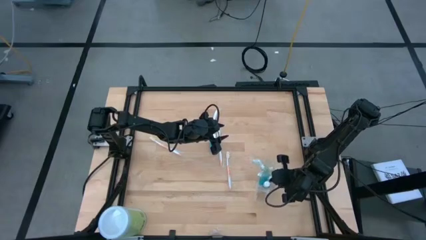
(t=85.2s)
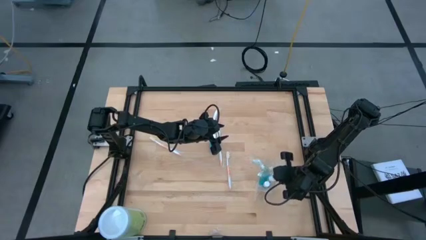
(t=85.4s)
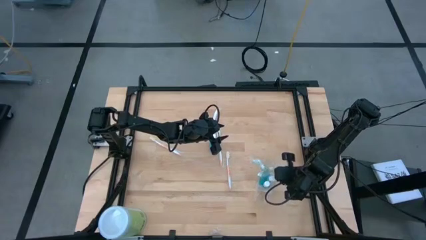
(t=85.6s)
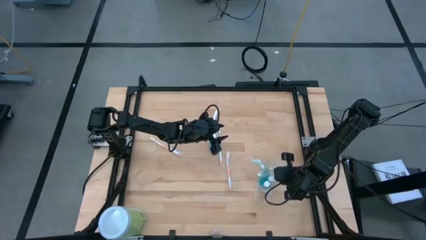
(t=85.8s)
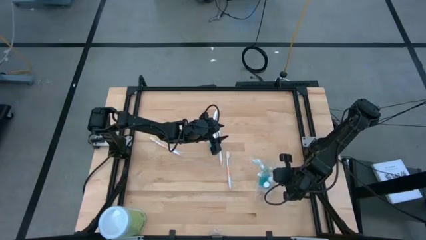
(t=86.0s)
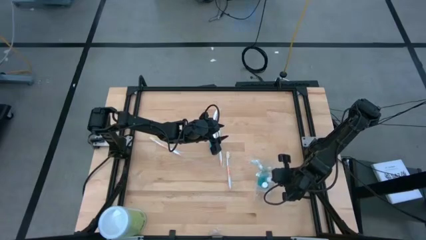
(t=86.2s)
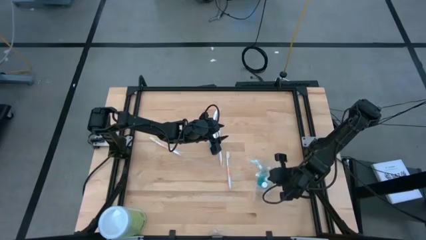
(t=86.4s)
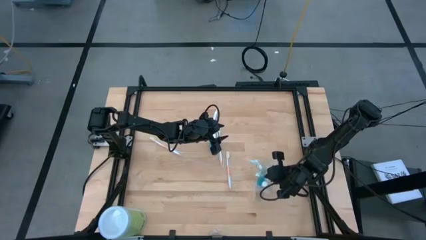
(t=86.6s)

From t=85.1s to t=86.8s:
Task: Pick & Place toothbrushing station
Adjust the blue mouthwash in the middle section of the transparent organizer

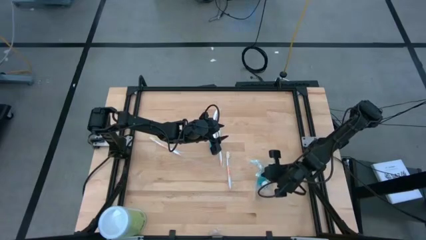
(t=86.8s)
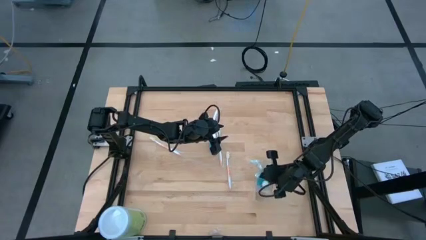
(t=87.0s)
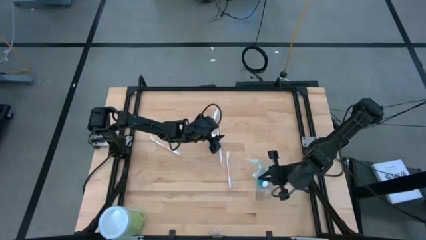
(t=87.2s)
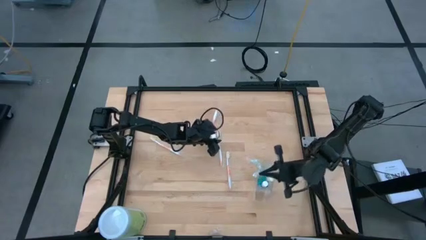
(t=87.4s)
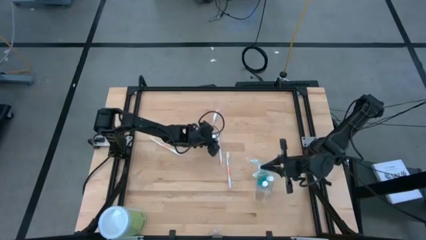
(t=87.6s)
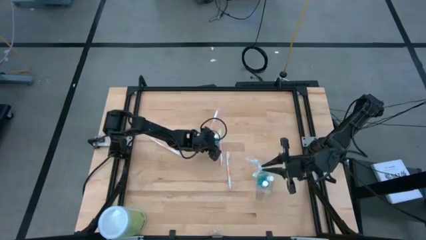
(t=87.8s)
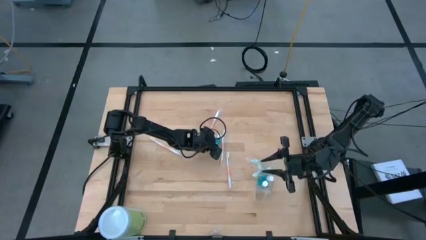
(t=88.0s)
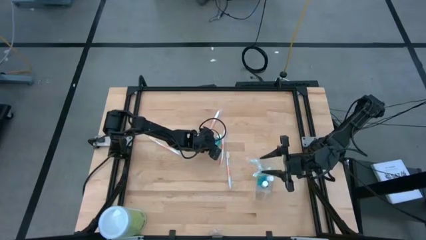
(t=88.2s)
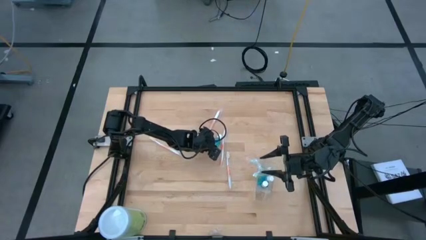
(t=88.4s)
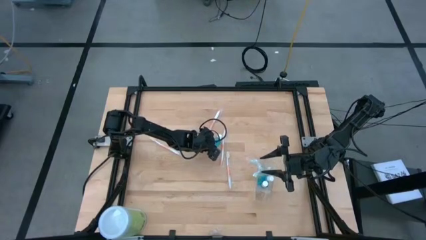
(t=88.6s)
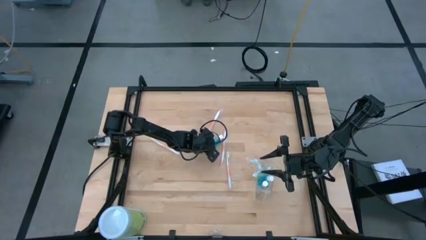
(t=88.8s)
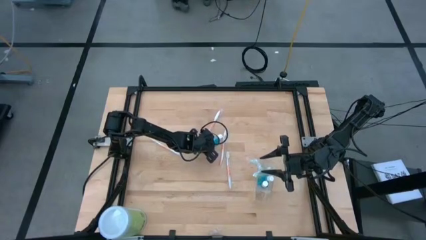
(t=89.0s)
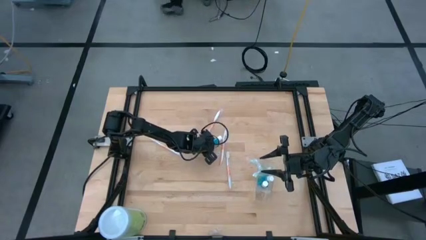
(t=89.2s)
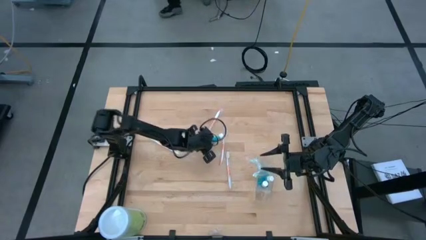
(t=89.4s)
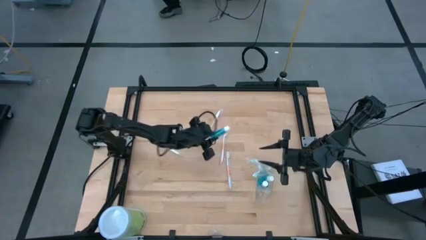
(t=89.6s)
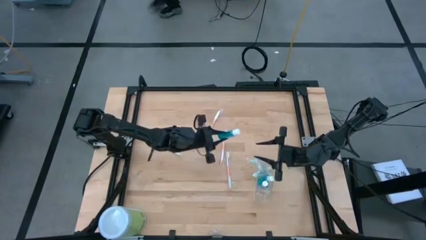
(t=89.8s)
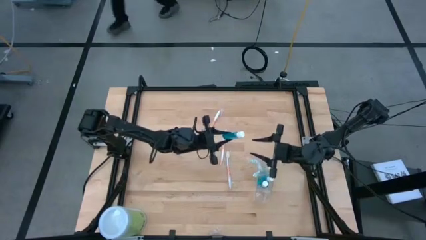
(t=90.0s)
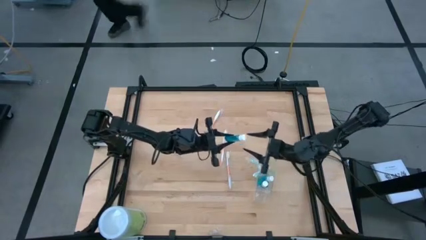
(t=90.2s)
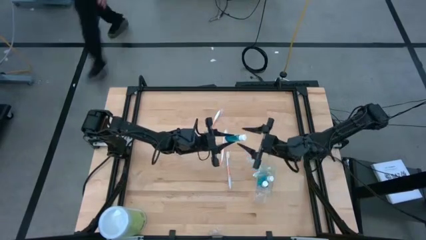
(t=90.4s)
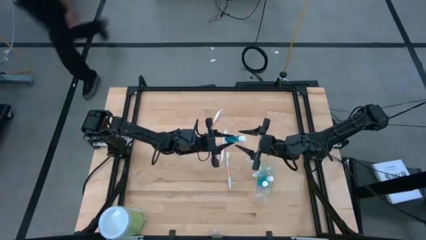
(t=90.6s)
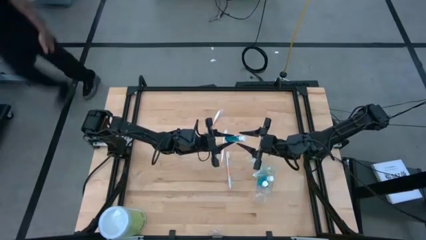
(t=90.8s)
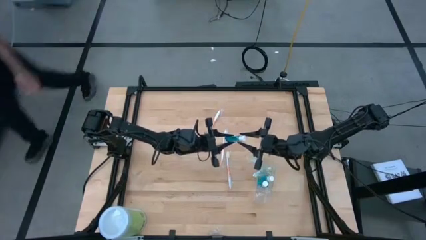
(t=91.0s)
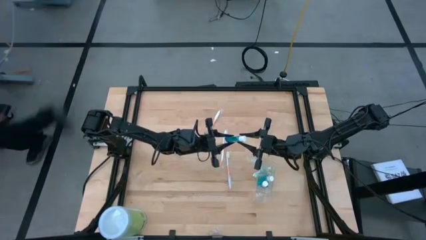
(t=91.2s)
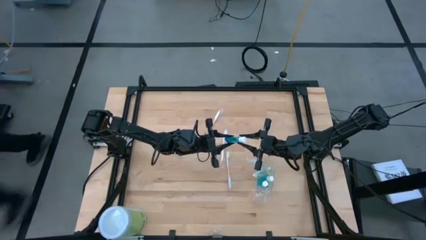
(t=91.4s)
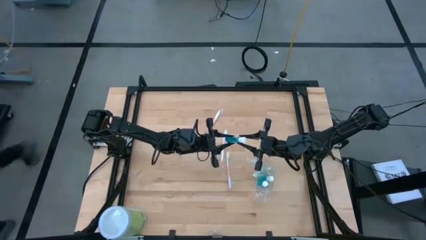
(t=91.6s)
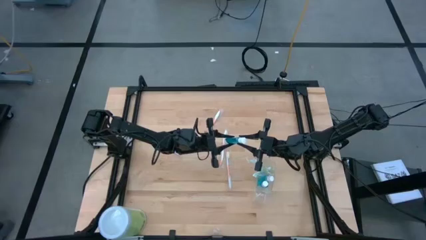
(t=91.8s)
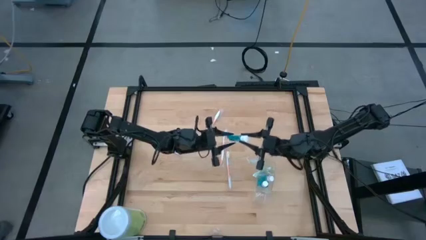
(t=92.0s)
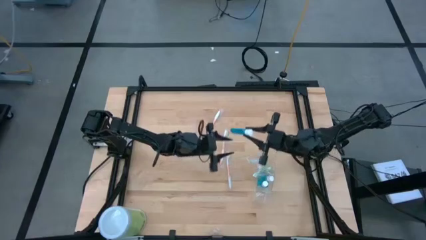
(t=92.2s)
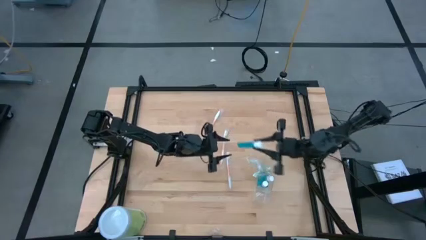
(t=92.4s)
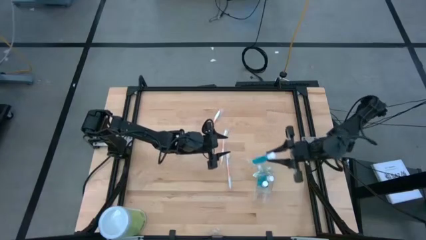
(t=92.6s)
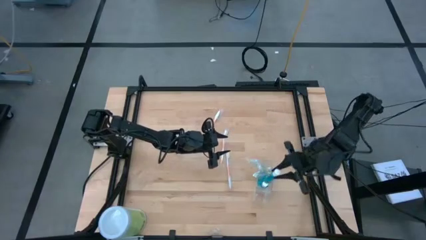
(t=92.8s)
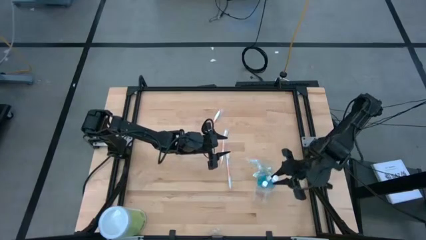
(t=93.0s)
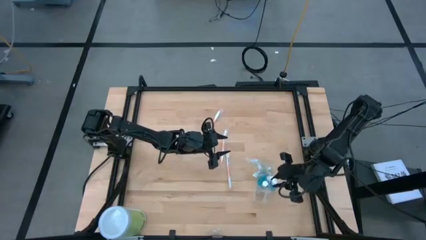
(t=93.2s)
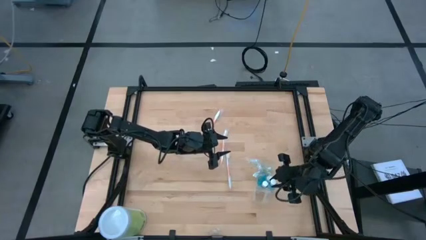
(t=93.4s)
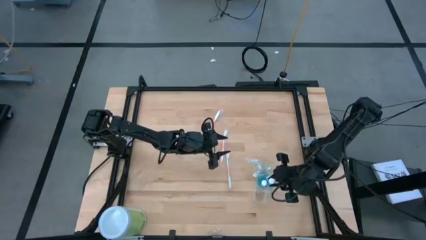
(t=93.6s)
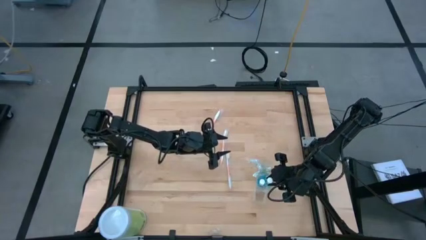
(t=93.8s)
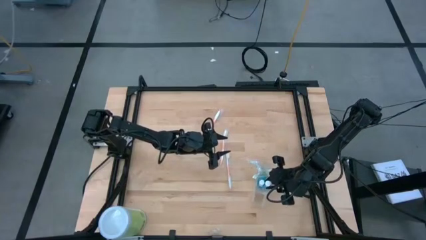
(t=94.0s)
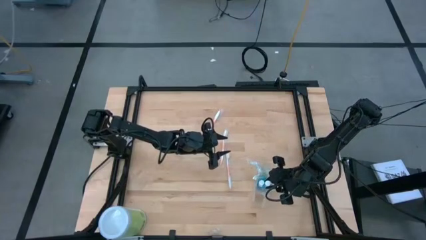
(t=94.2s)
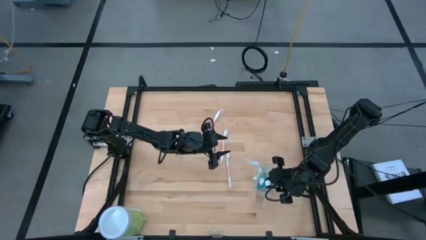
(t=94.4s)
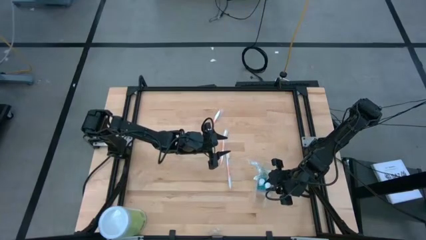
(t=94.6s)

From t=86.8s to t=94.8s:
Put the blue mouthwash into the middle section of the transparent organizer

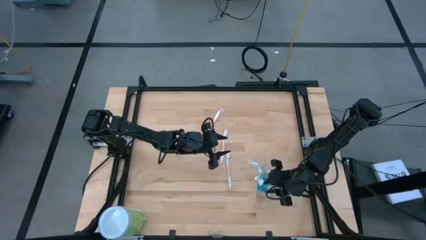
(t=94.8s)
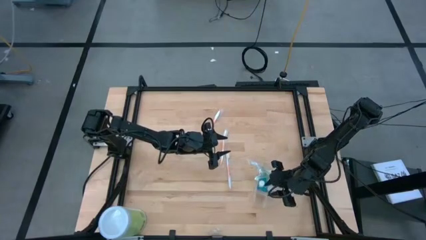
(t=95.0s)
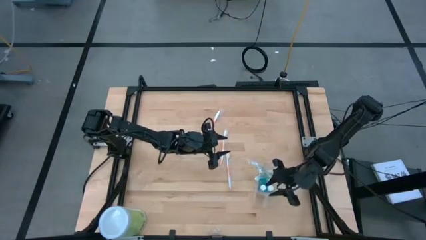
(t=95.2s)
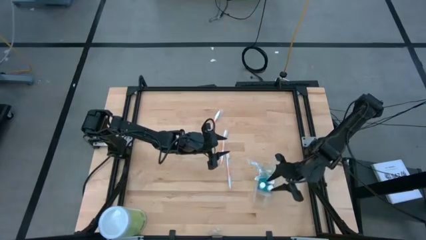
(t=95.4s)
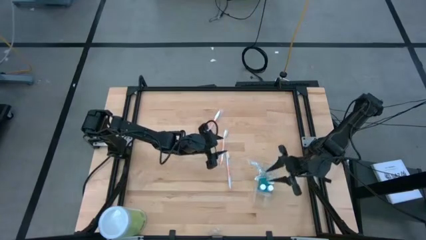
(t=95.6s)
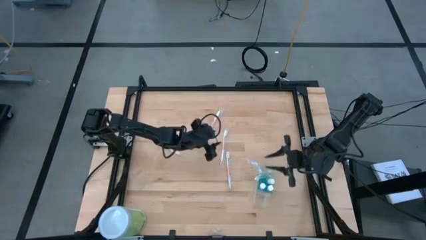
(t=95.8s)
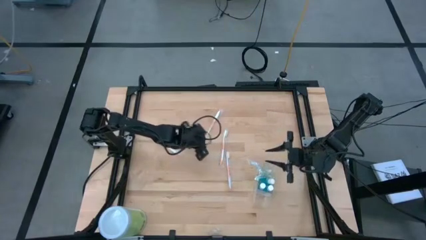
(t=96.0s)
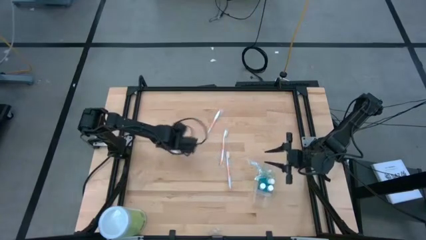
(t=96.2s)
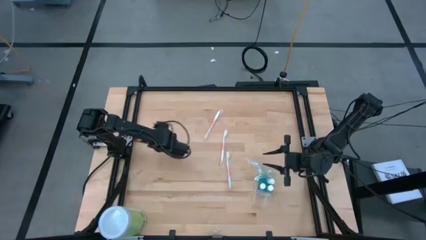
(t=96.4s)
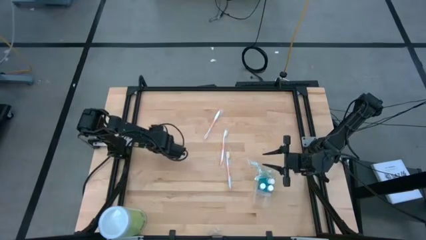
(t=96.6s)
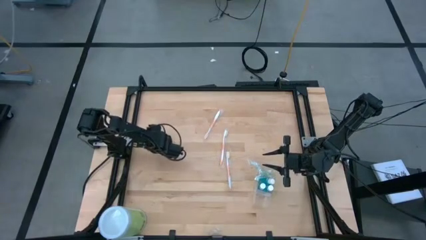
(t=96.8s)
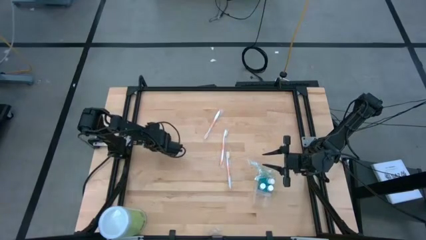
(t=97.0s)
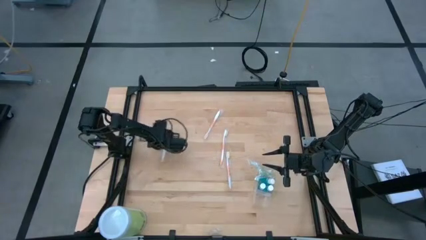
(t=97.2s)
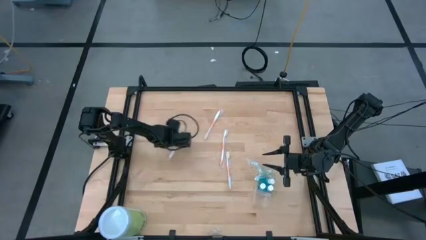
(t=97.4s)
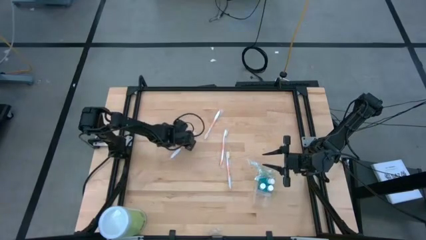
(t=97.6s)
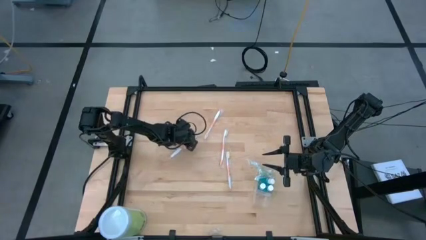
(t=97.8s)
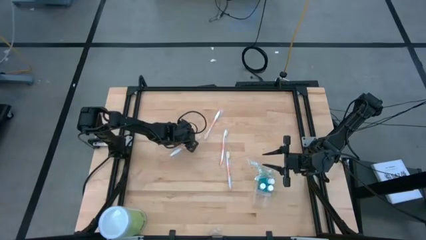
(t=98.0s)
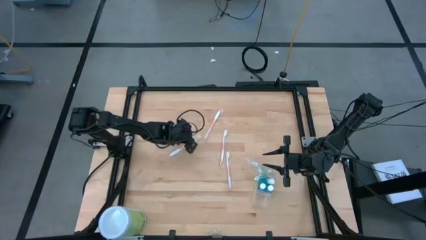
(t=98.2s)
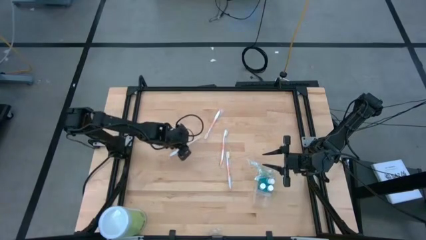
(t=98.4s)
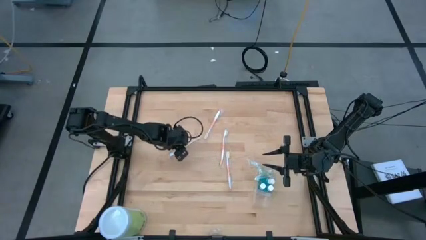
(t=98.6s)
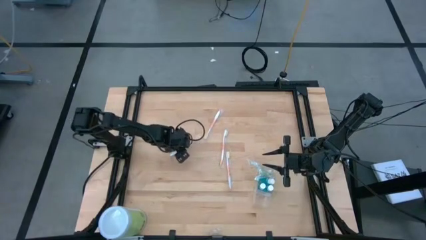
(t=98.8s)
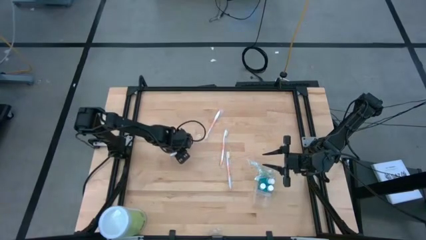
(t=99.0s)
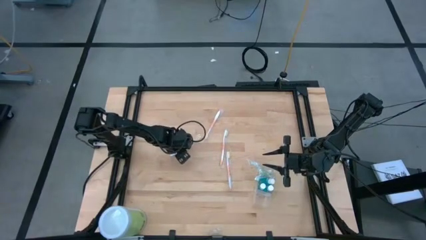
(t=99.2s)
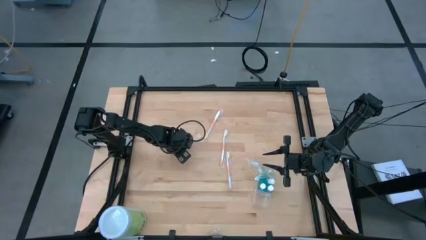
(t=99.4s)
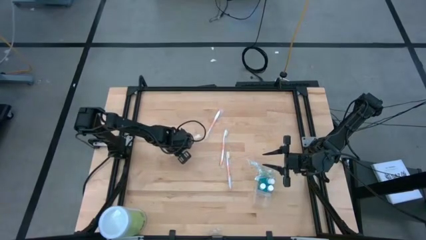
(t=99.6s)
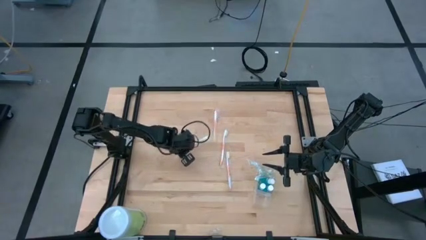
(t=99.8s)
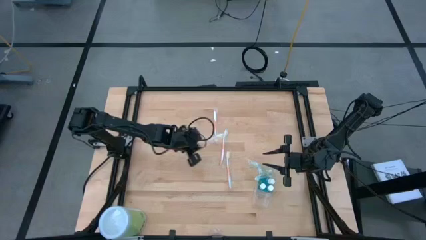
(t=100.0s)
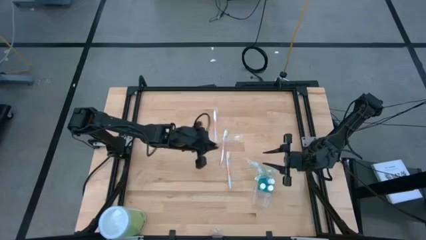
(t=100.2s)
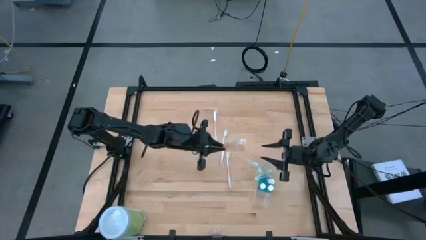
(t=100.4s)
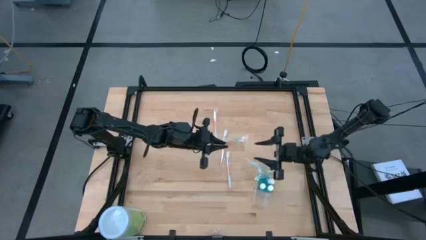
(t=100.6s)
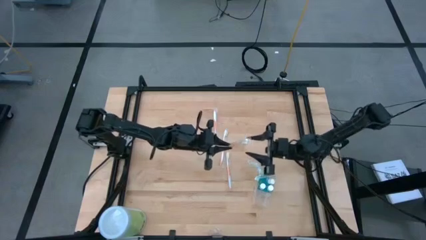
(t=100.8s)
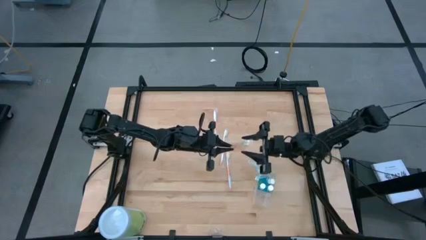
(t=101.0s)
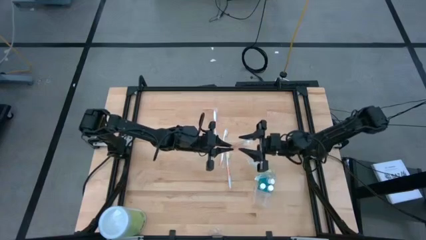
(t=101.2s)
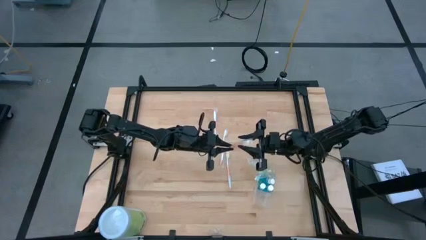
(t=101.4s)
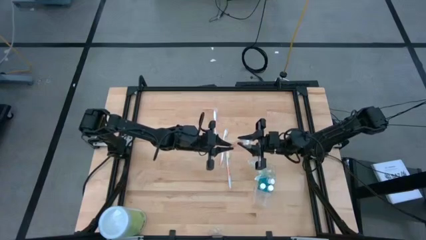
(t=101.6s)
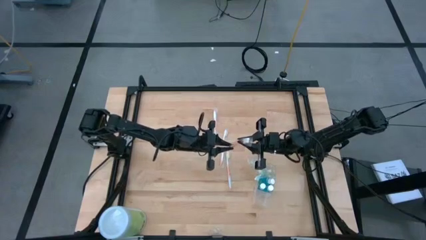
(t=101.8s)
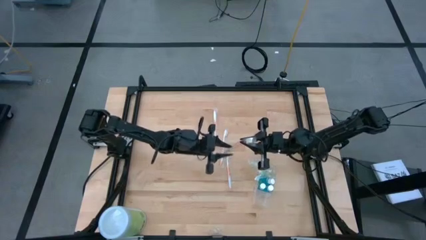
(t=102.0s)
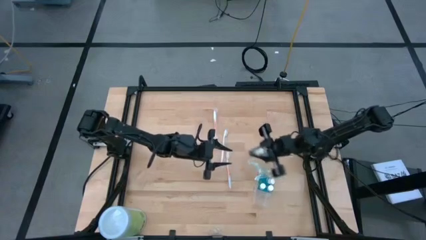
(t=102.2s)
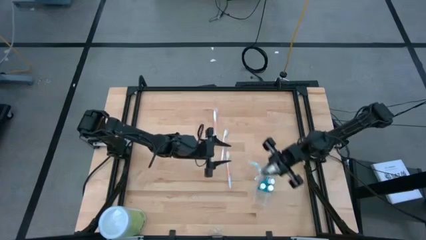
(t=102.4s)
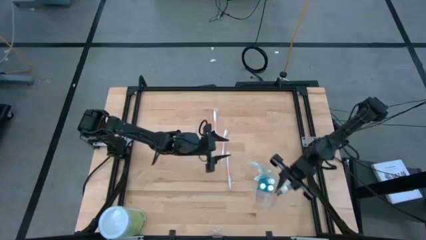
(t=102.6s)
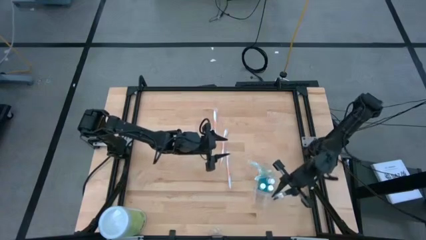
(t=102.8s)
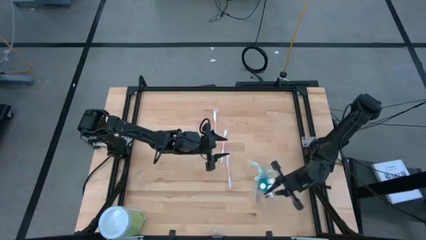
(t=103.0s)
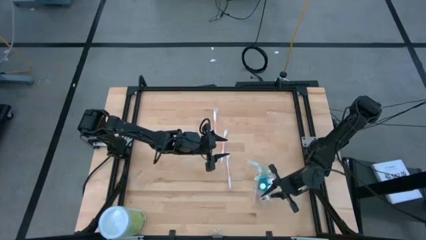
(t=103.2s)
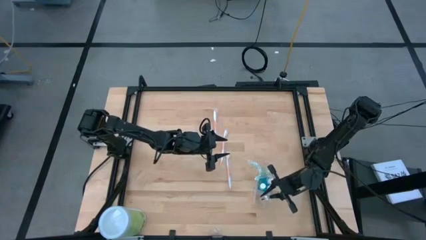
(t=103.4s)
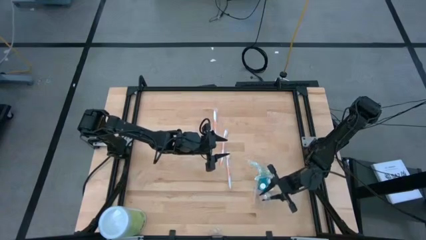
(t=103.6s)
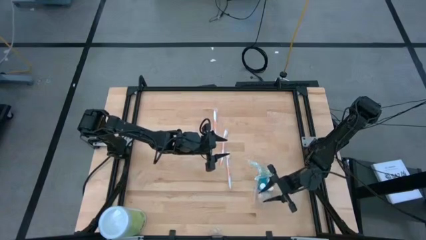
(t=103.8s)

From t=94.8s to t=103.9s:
Put the orange toothbrush into the bottom section of the transparent organizer
